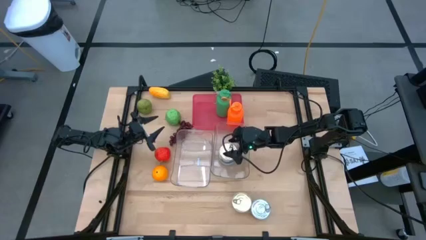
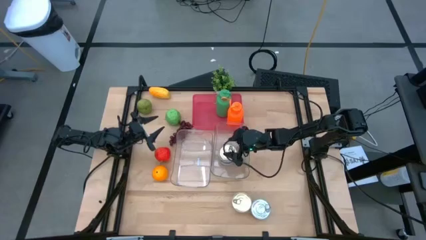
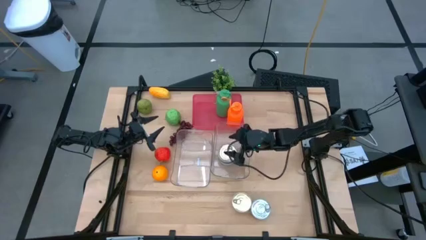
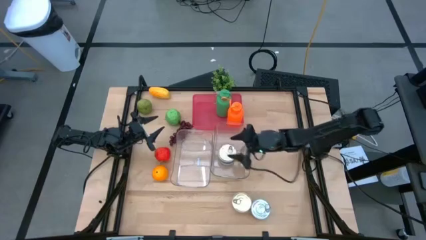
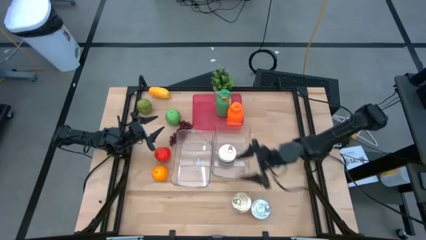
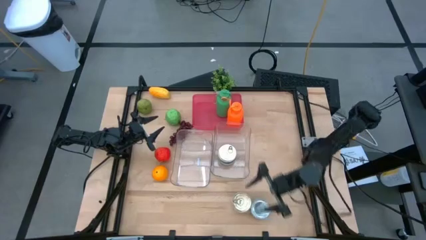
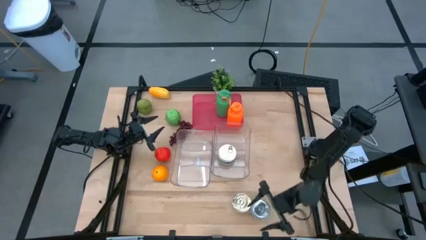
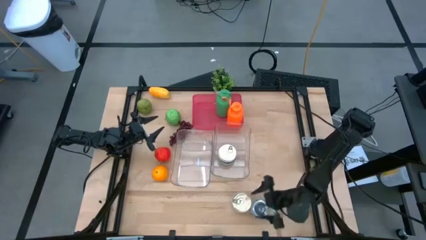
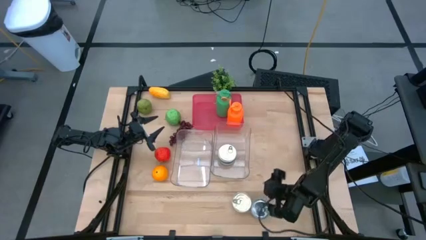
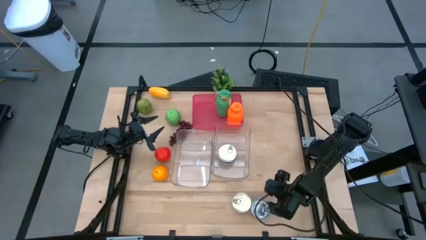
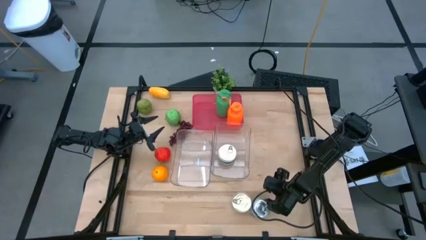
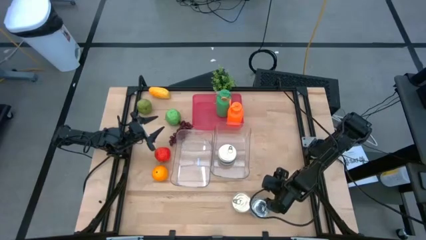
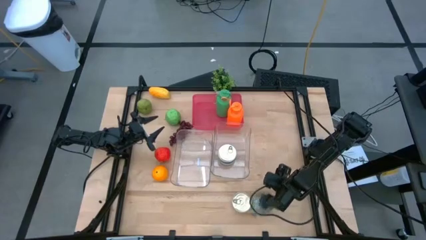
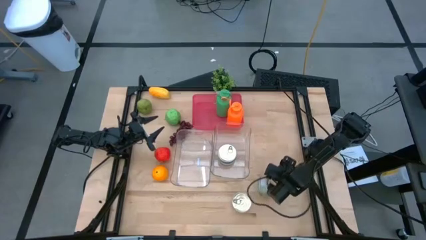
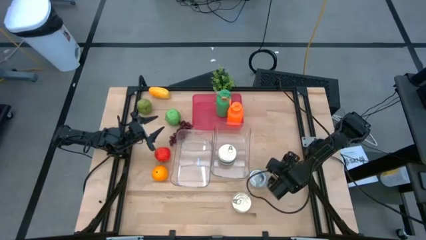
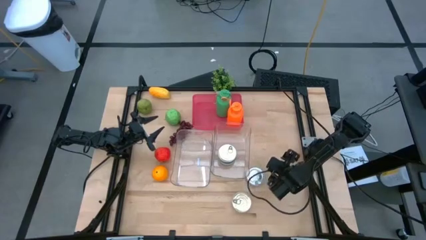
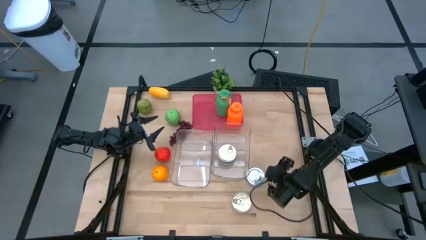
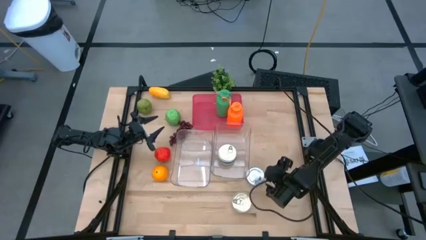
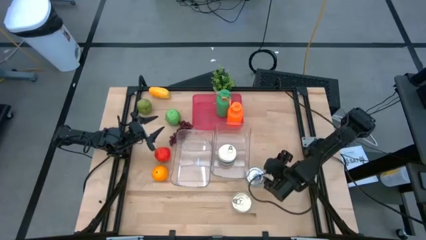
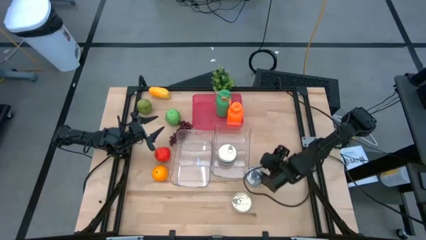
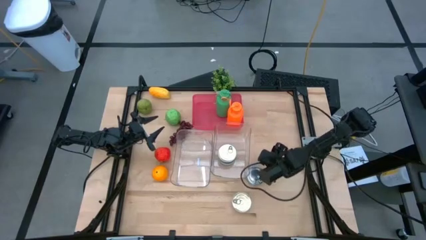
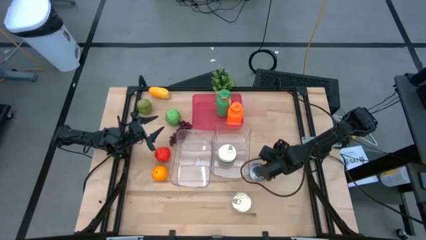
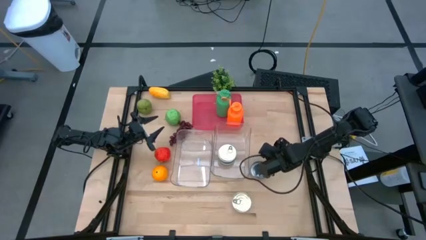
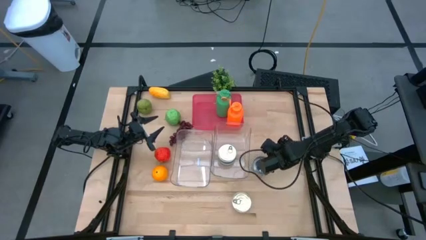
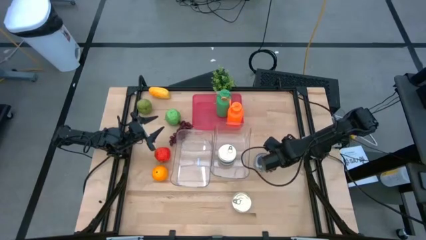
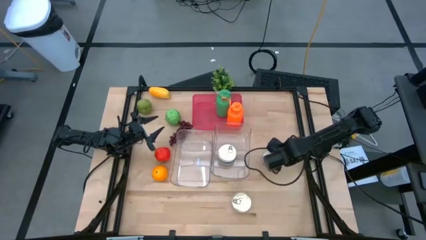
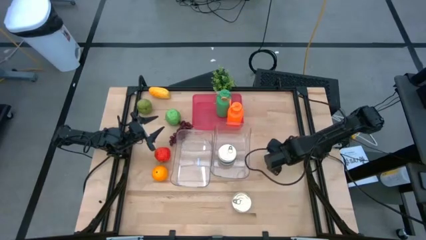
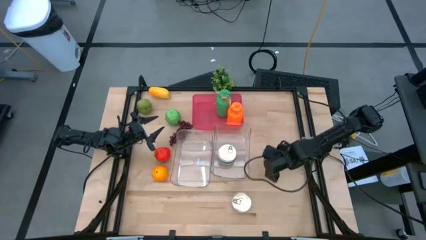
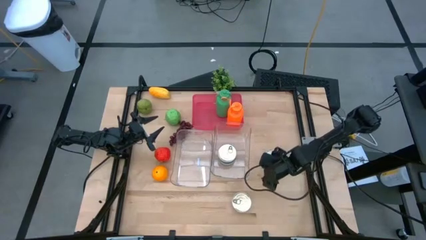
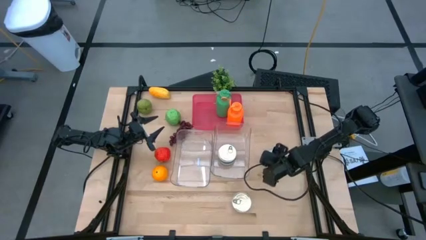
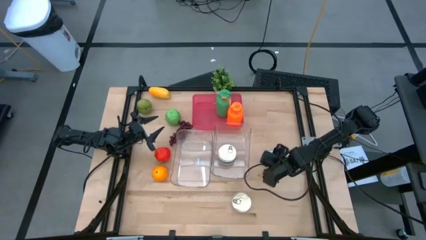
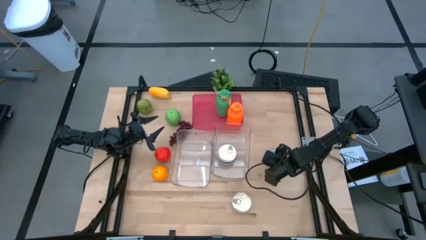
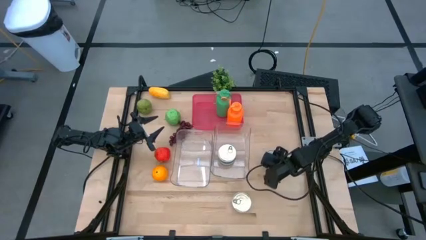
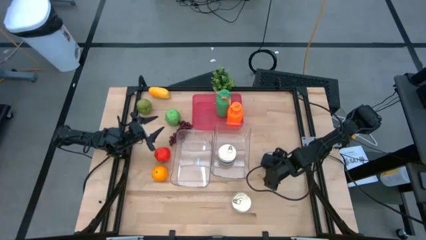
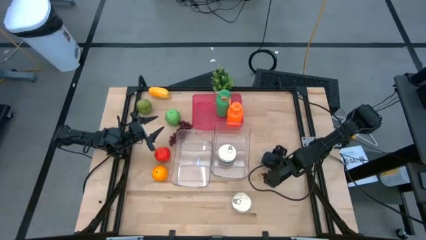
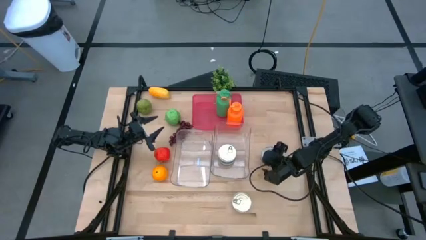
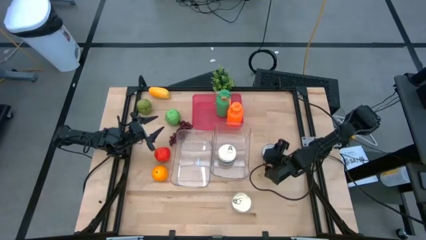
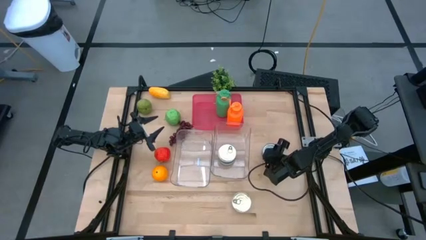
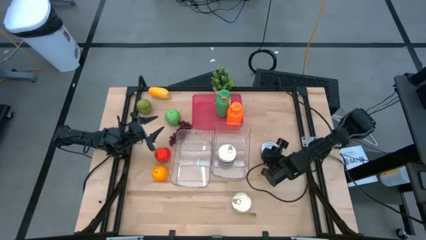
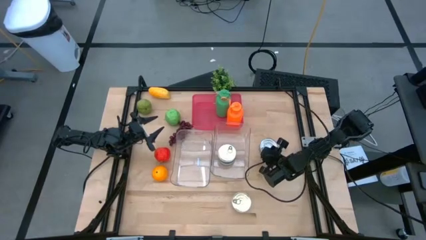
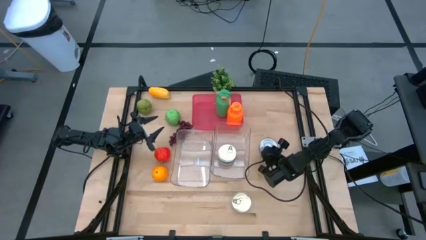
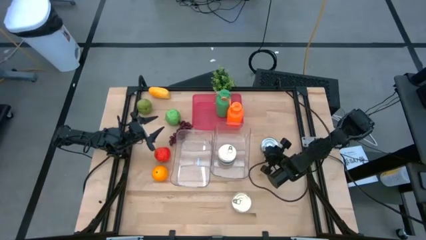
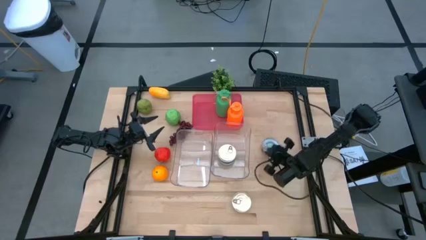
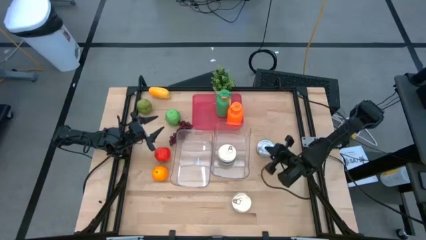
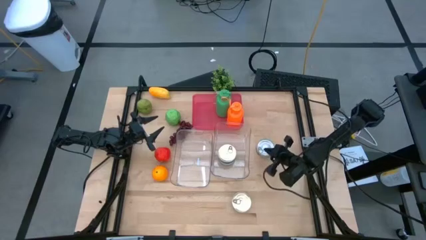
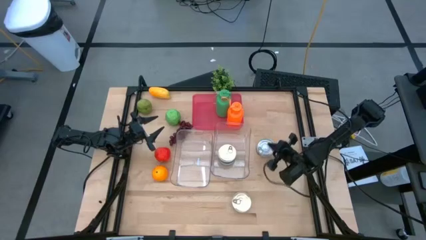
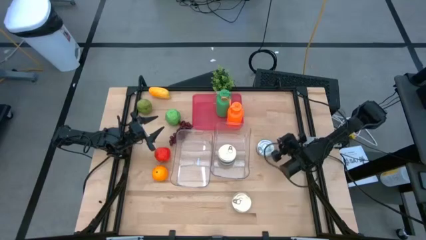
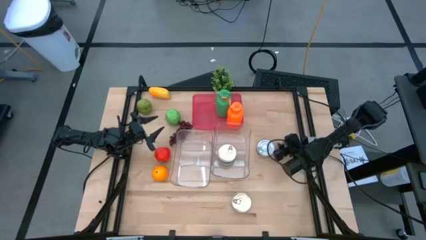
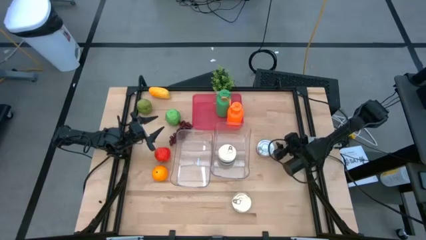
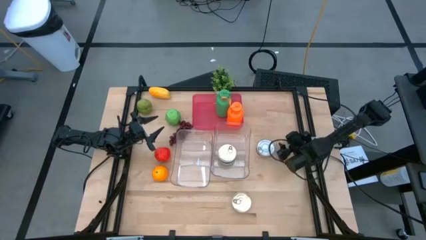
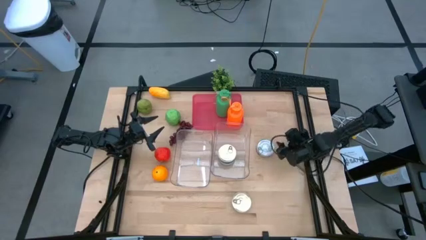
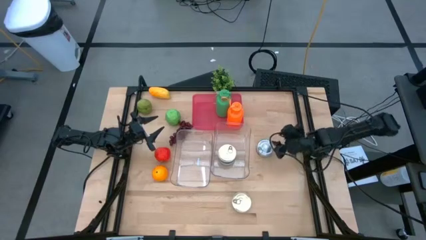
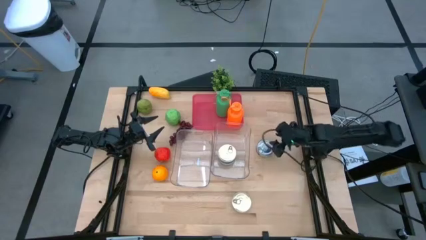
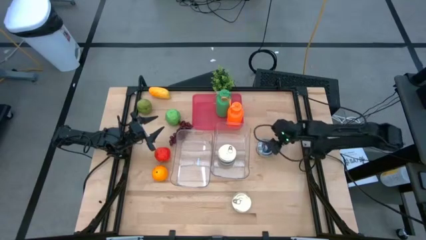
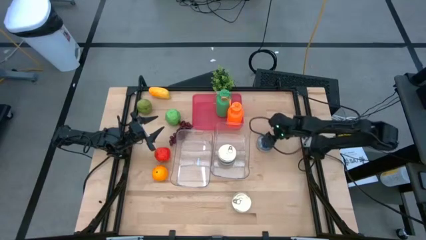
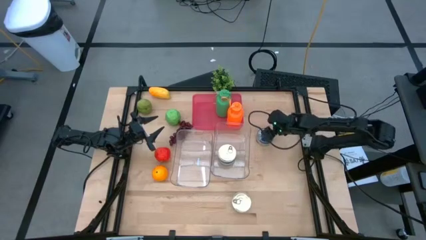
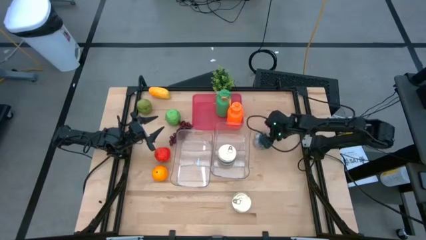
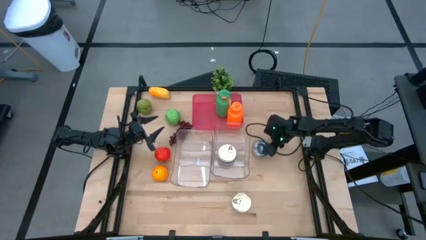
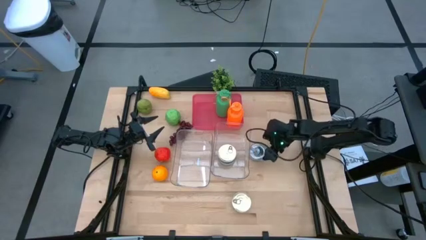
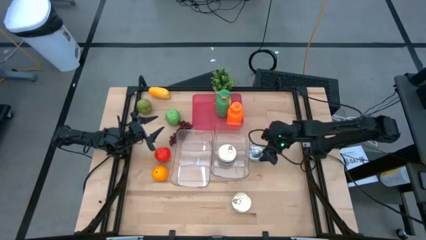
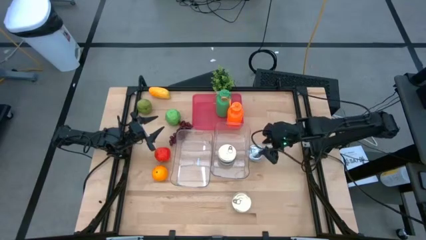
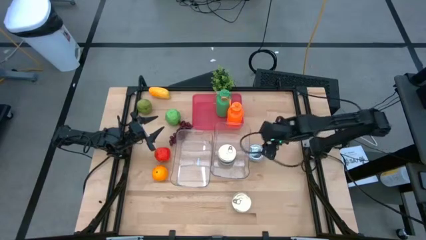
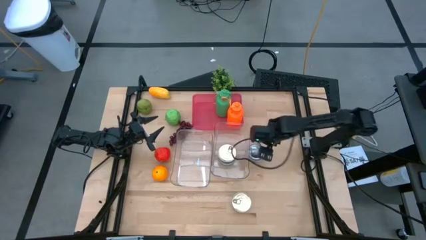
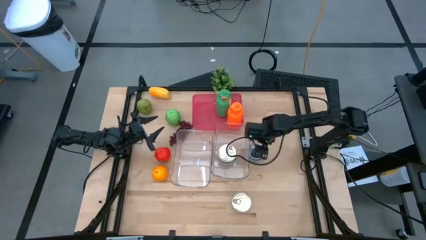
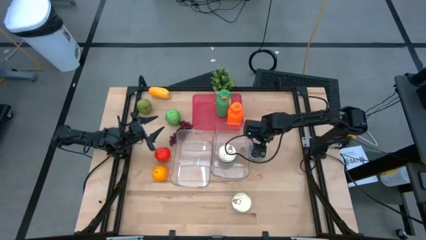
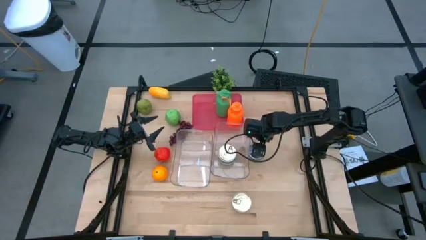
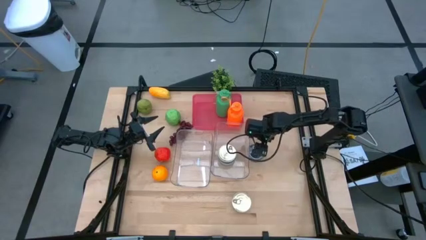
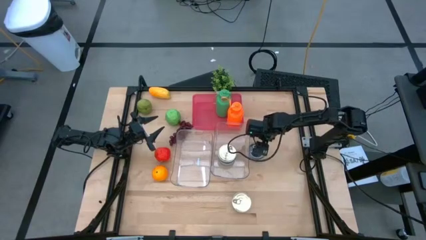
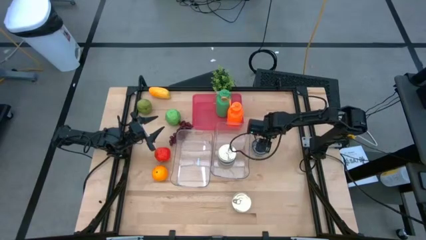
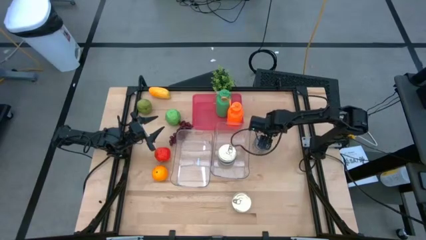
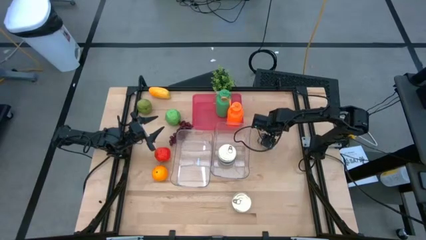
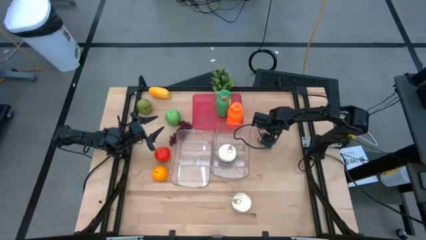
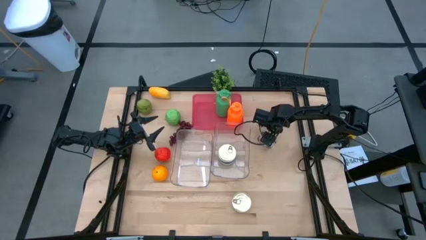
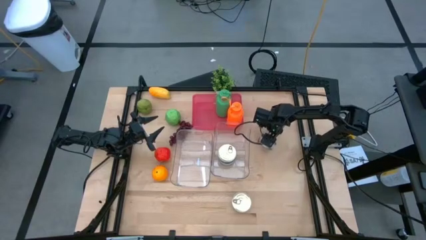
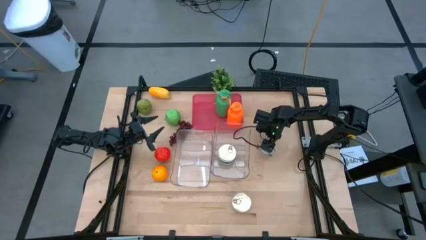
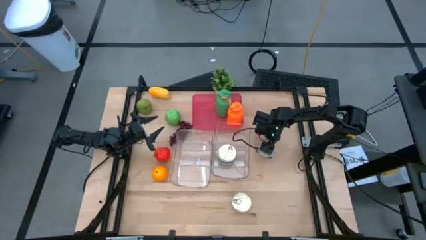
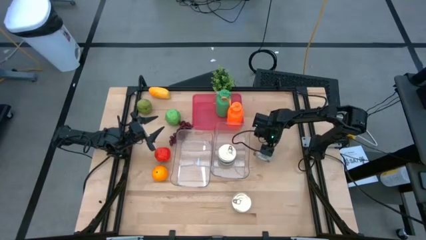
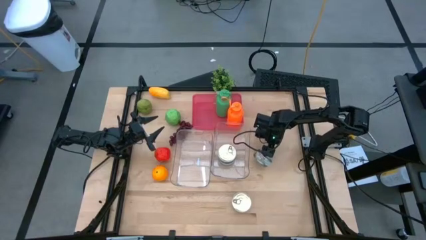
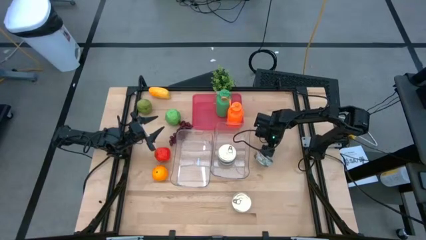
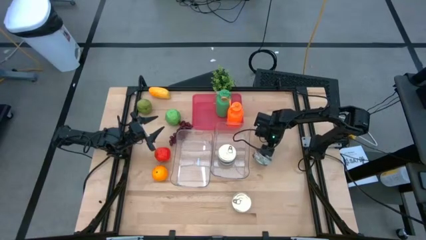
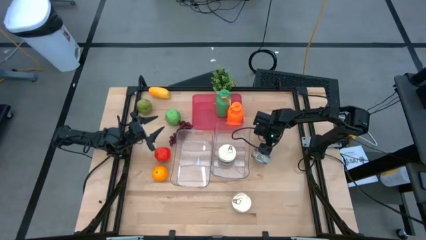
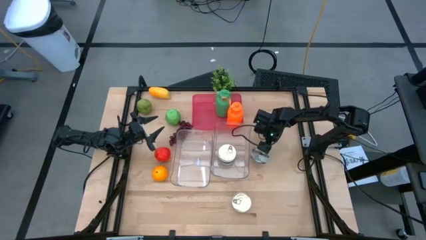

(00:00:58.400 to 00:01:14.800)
Task: Pick & Place Food Item
Put the green tuna can into the right transparent bin

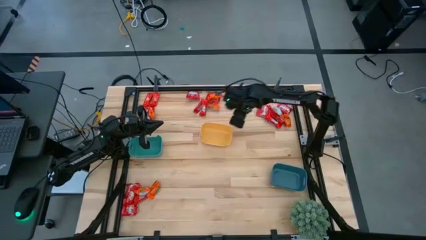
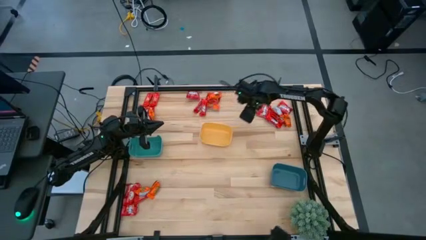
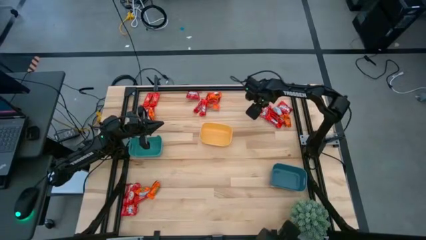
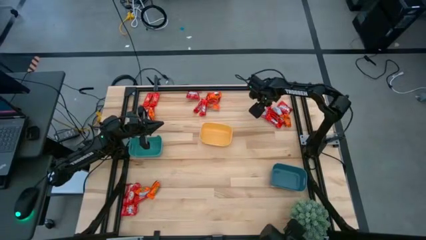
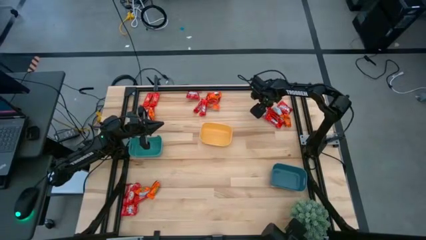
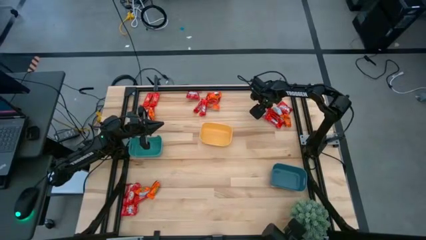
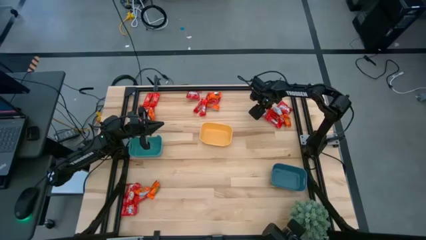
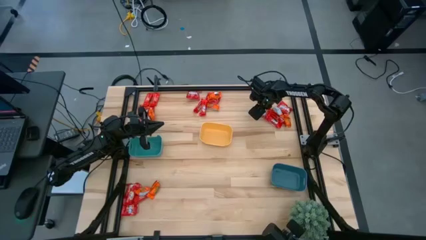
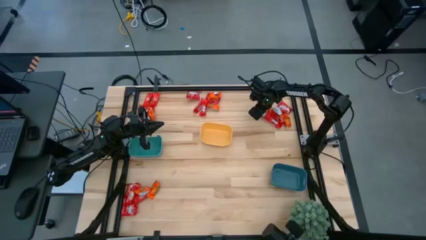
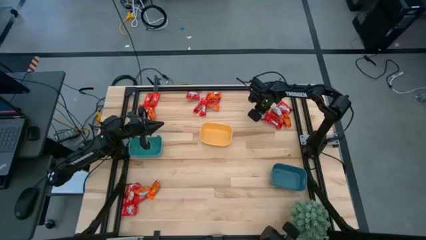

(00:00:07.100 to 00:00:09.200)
Task: Sort candy
Put the red candy into the yellow bin
